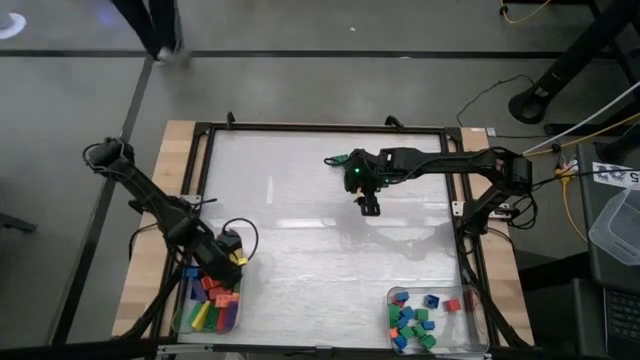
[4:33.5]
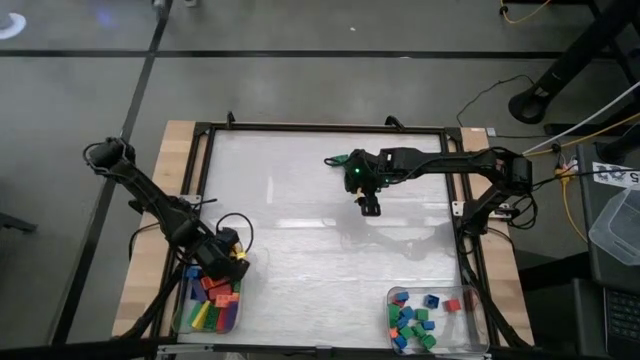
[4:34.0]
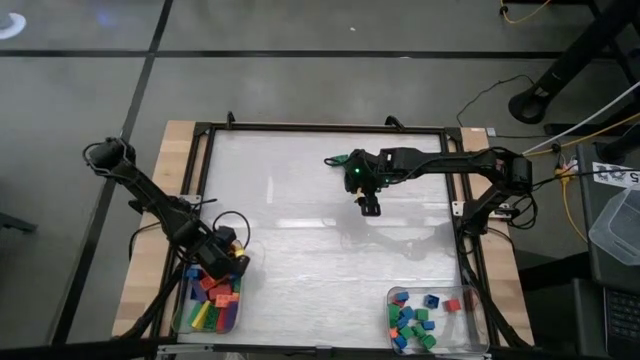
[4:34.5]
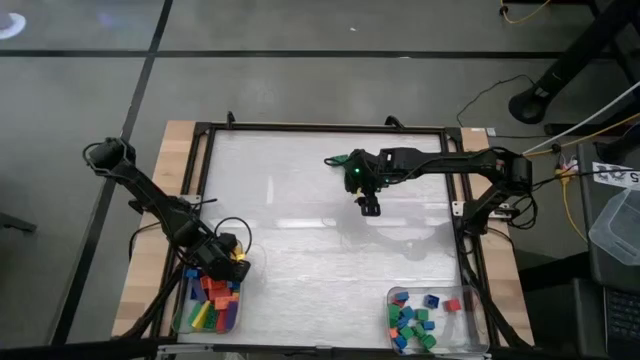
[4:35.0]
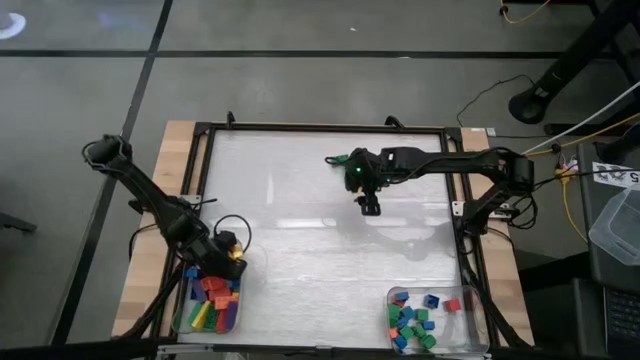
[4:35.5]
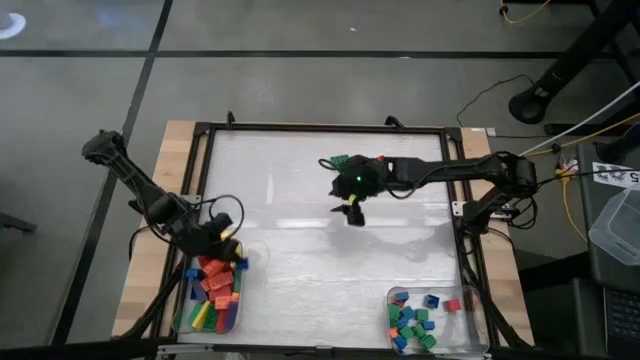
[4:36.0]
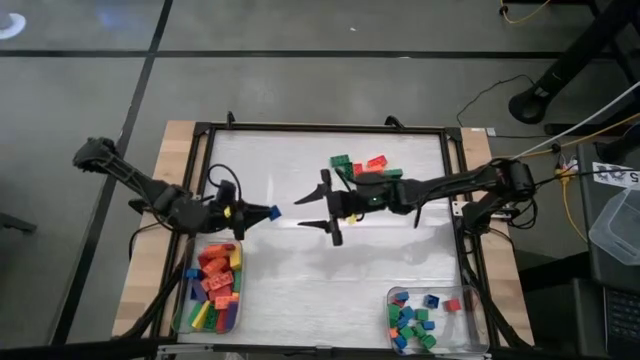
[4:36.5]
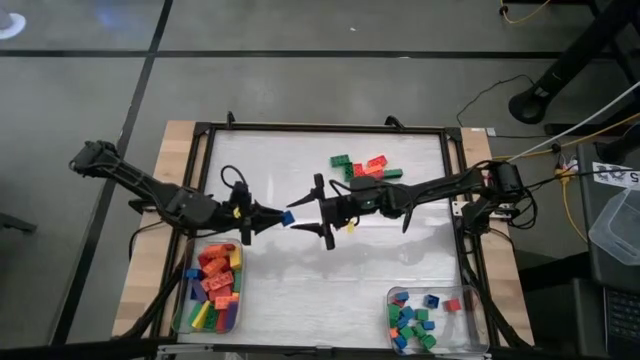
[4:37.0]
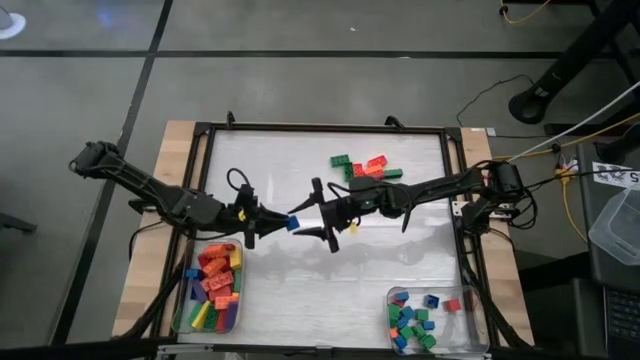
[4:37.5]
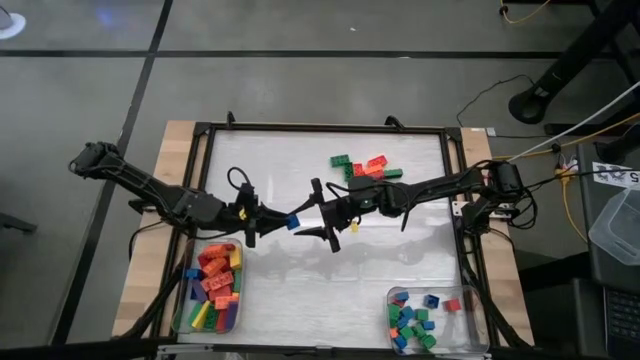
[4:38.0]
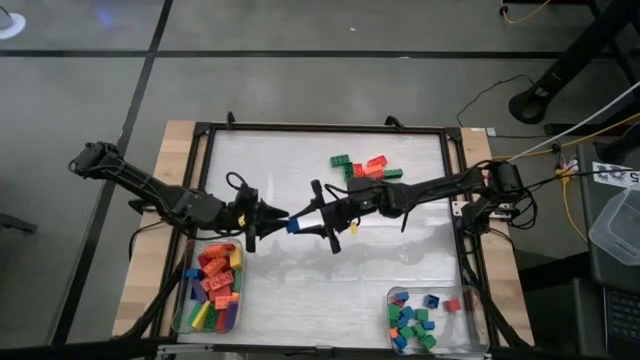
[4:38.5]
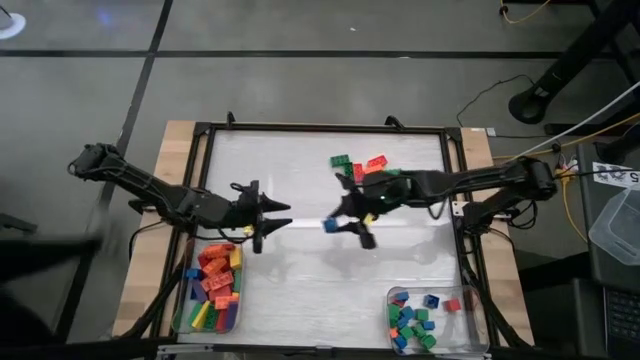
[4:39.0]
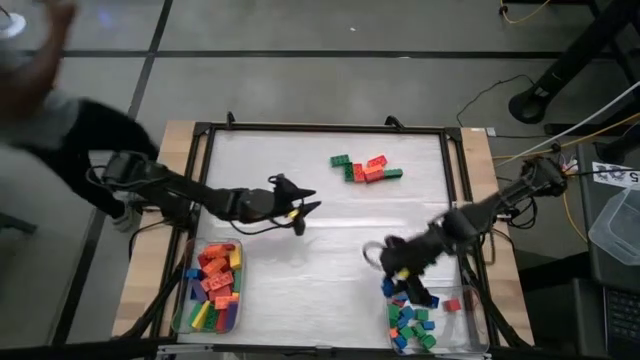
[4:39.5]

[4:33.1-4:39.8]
Task: Sort blocks by size
Put the small blue game piece into the right transparent bin

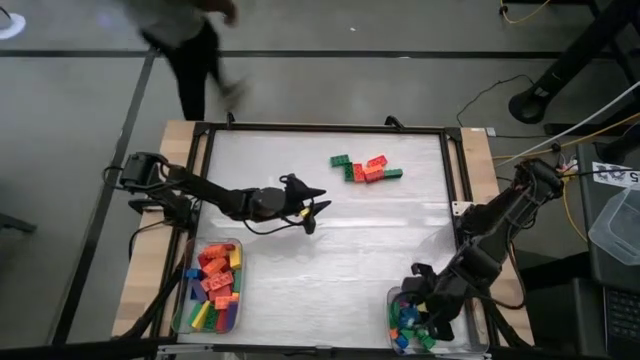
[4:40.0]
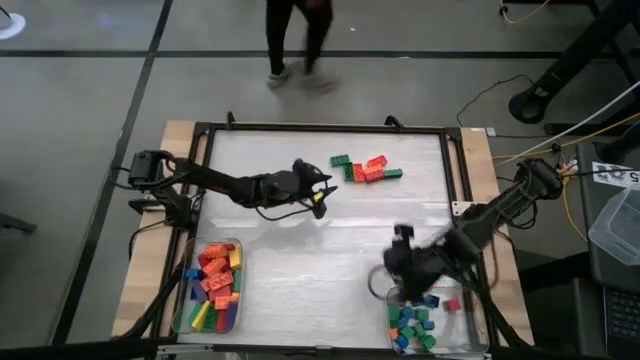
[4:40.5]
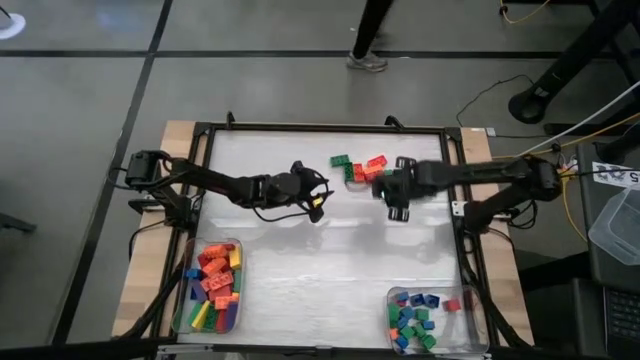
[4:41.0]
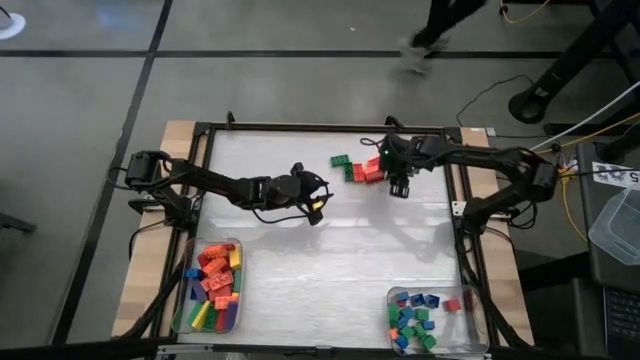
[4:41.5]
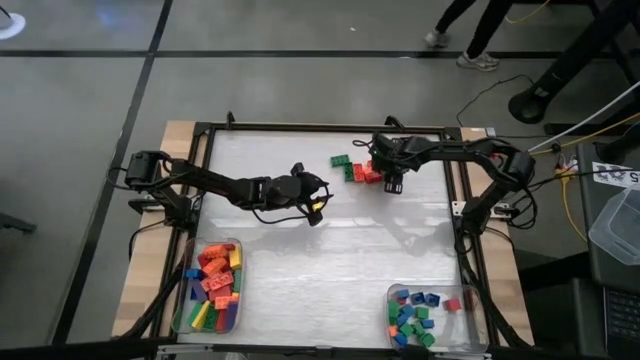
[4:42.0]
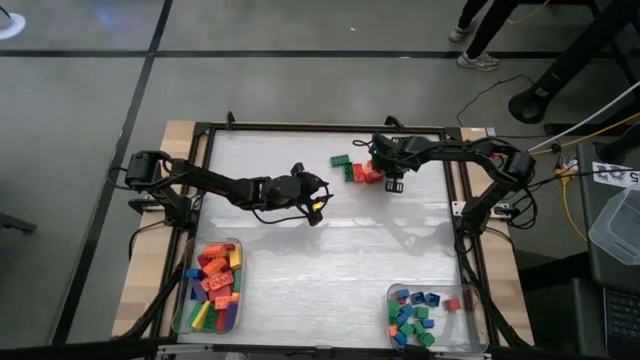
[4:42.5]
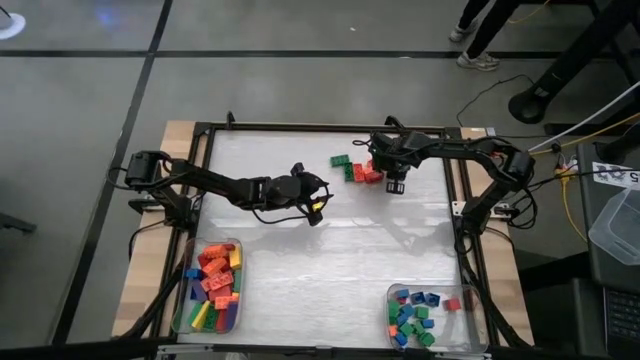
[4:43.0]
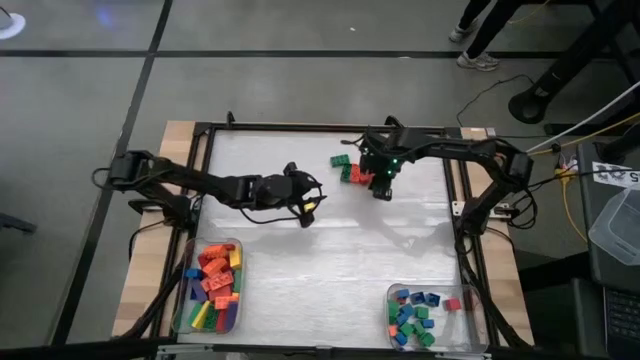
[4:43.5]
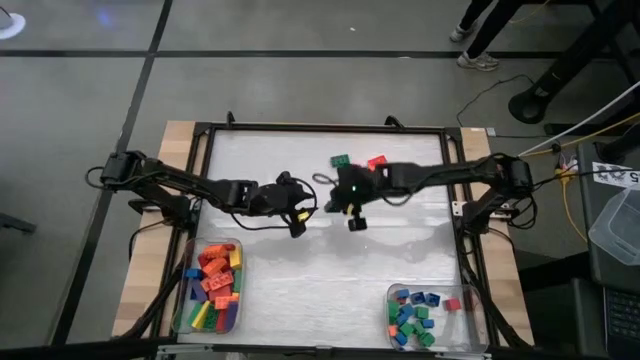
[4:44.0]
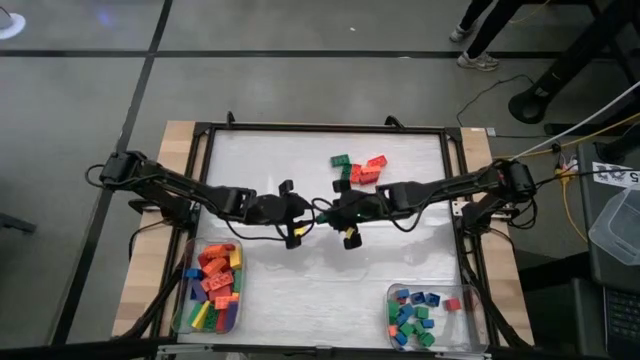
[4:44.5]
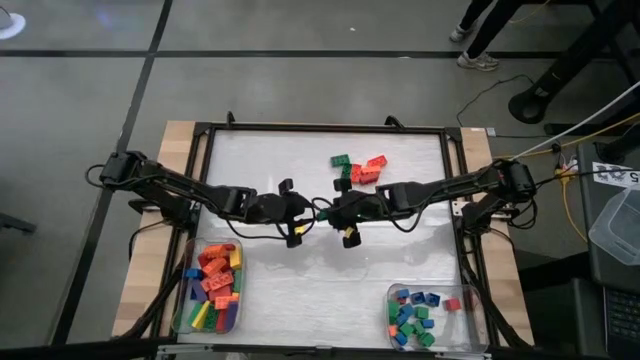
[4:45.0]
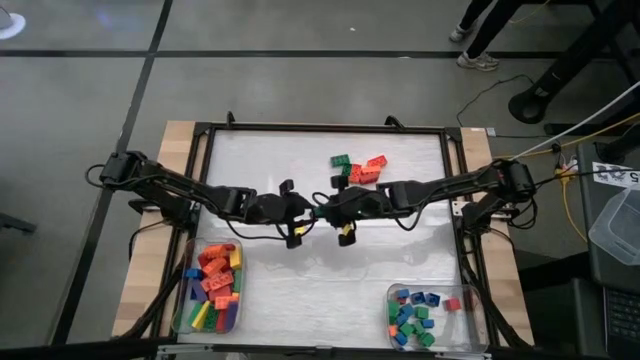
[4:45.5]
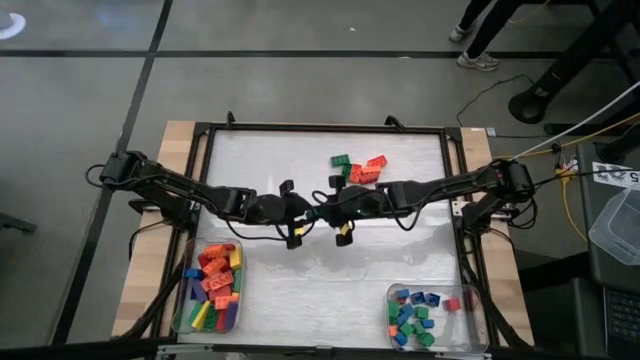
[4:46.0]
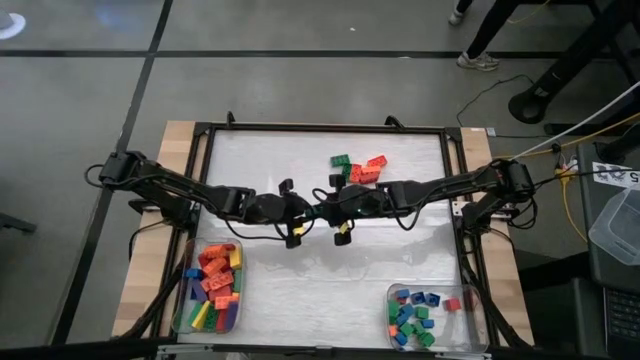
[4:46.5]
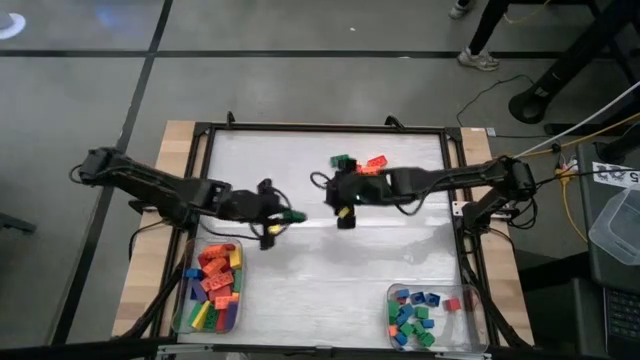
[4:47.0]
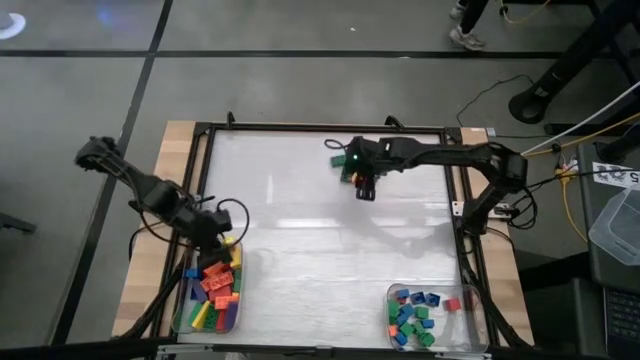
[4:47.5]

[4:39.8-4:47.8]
Put the large green game piece into the left transparent bin

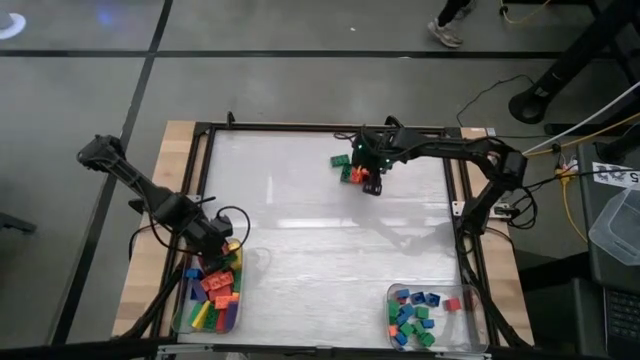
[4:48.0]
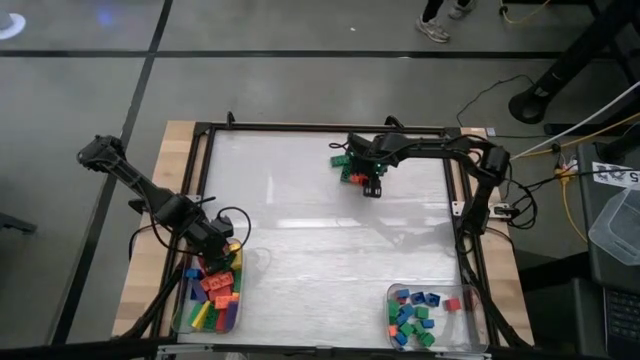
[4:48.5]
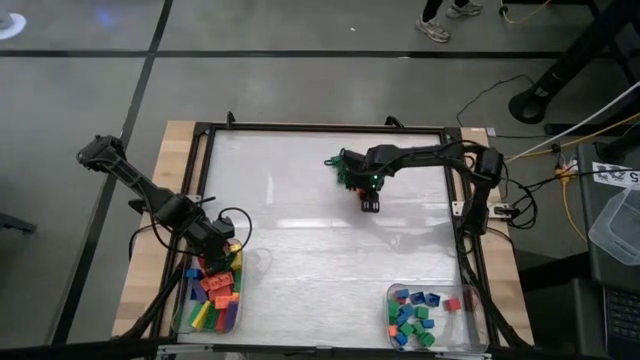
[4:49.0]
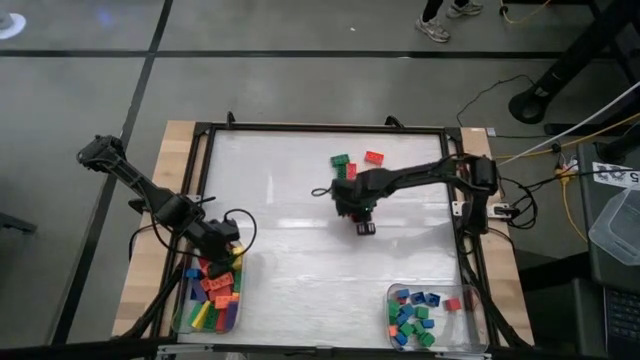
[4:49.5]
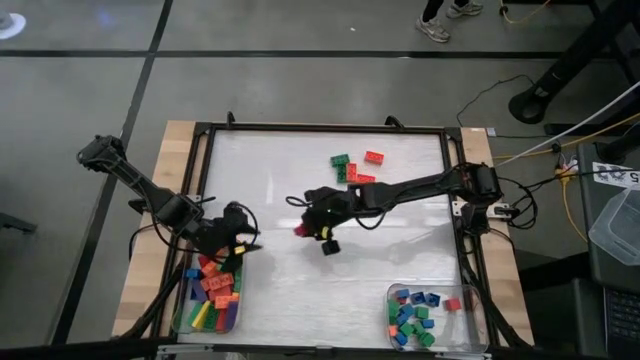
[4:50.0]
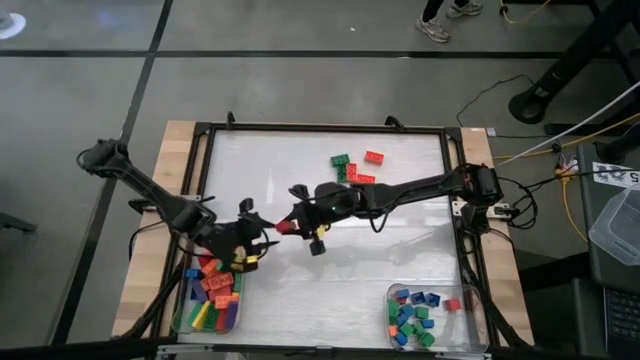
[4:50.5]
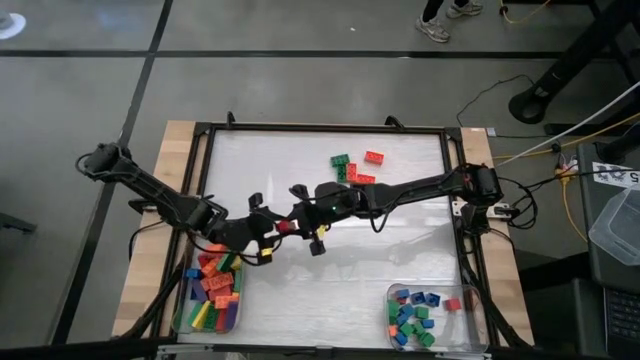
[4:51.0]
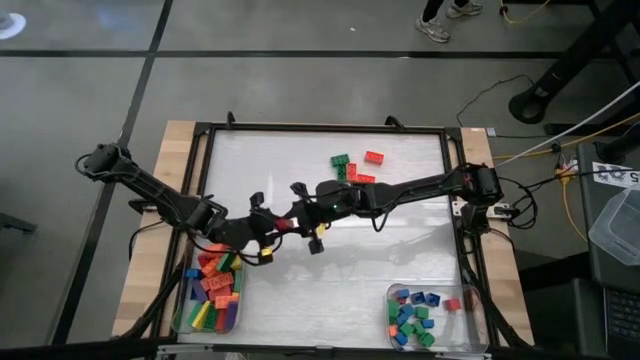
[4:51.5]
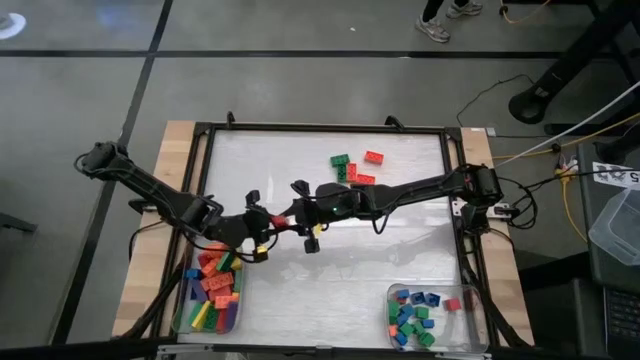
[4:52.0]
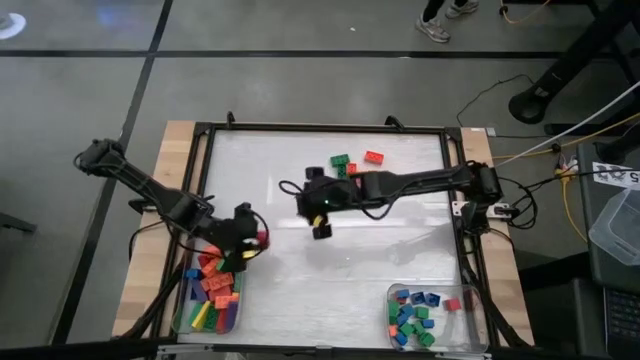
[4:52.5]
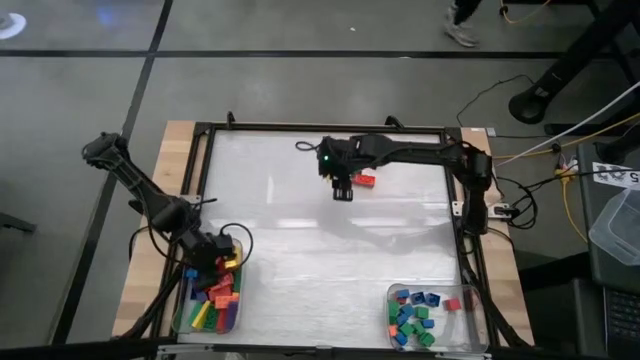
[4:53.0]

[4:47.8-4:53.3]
Put the large red game piece into the left transparent bin

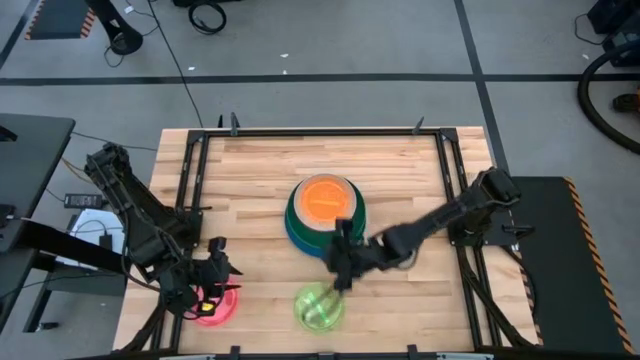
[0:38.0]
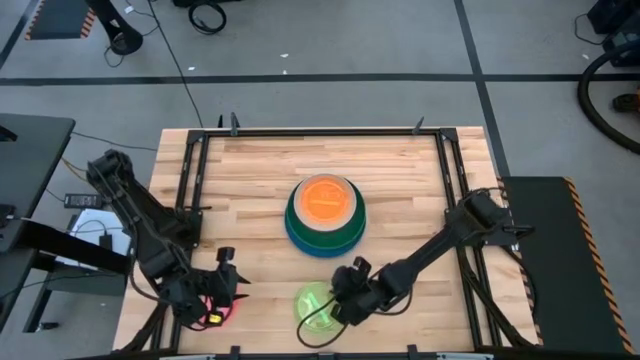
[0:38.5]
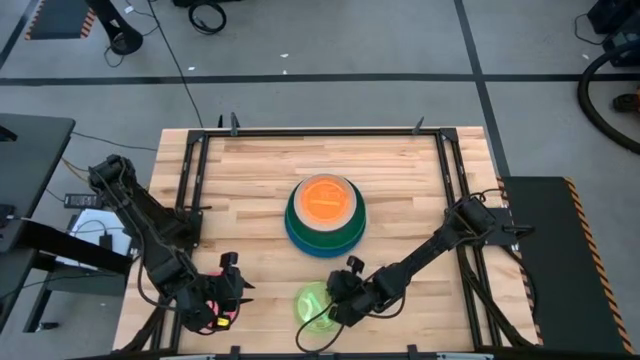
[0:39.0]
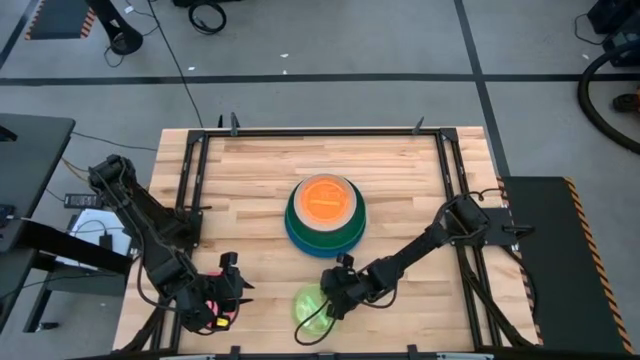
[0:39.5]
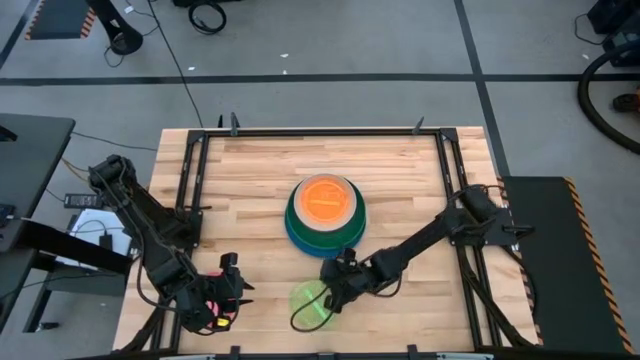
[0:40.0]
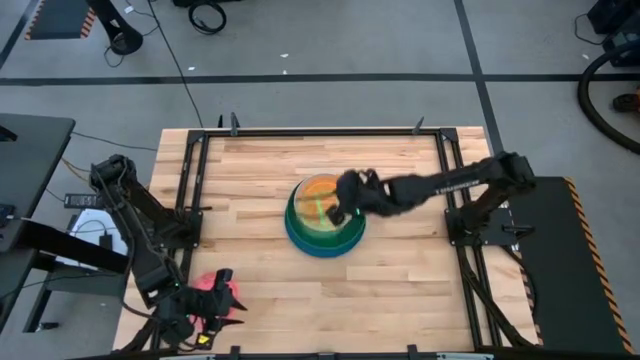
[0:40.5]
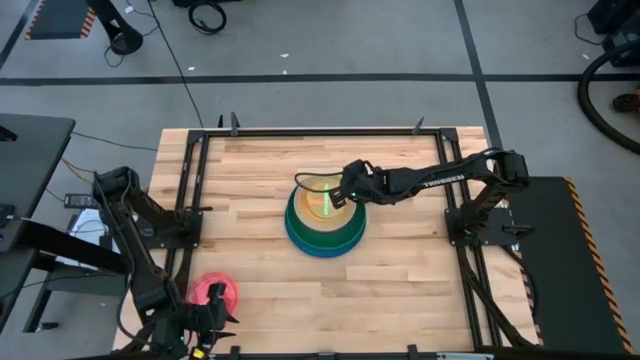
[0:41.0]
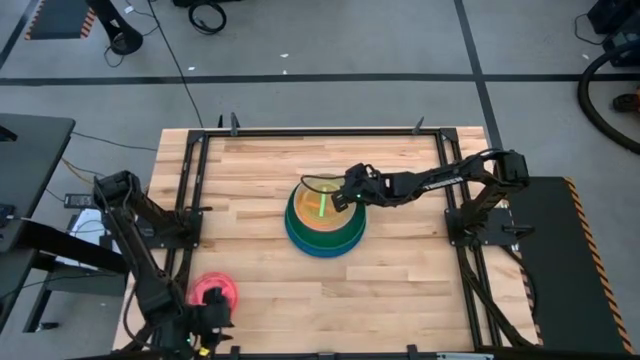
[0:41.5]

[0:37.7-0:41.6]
Task: Stack plastic plates
Stack the transparent green plate on top of the transparent orange plate
